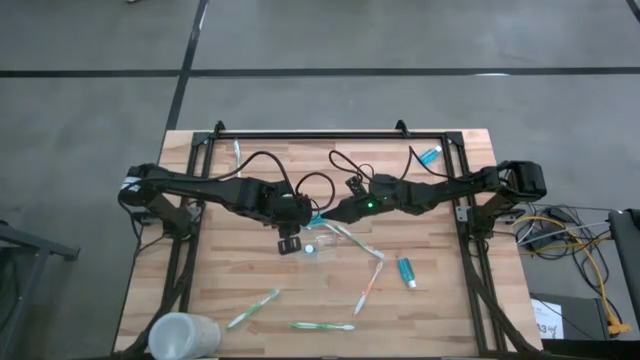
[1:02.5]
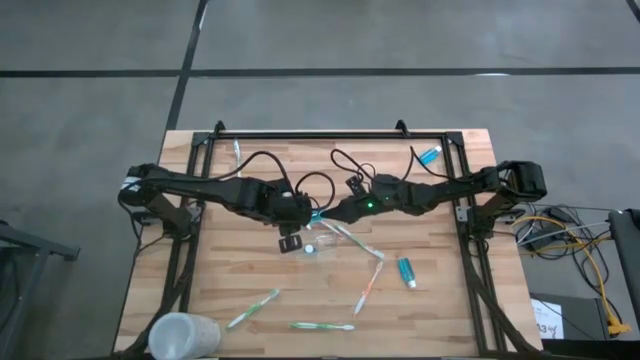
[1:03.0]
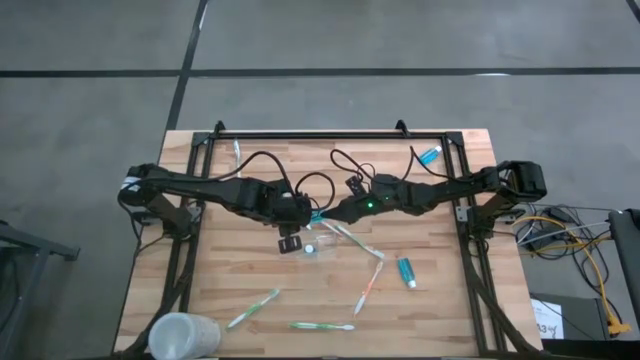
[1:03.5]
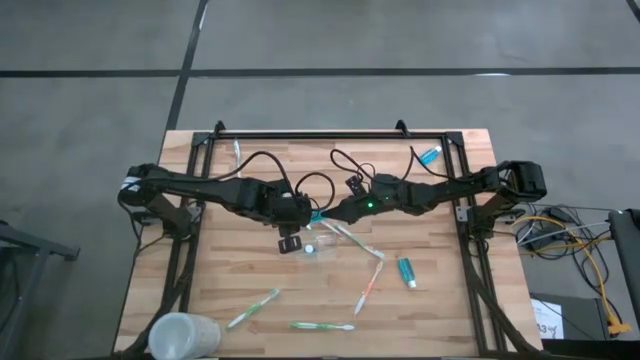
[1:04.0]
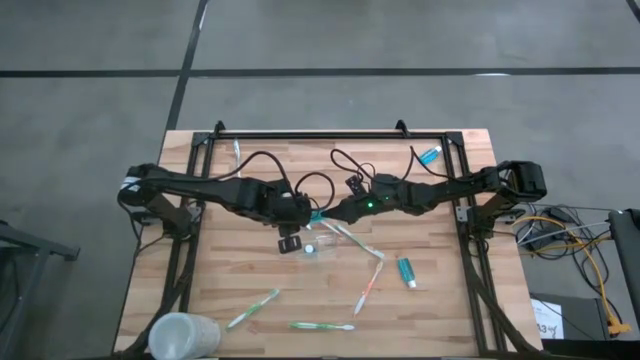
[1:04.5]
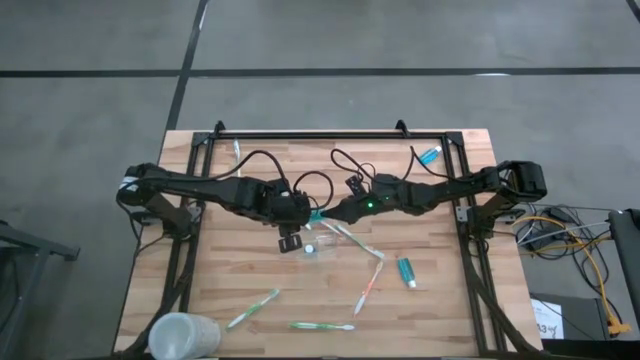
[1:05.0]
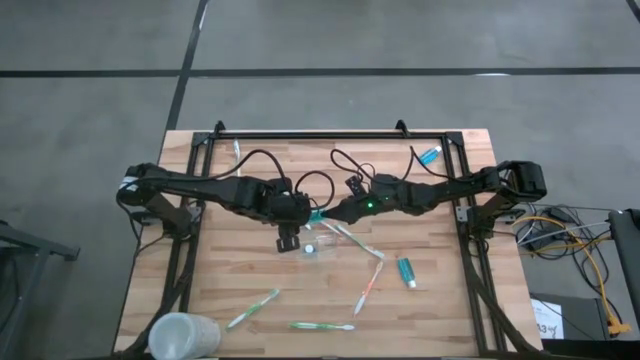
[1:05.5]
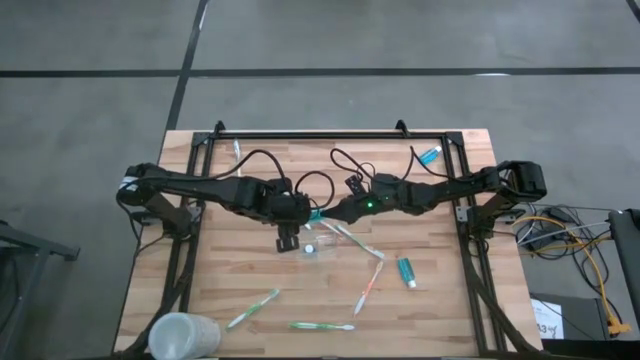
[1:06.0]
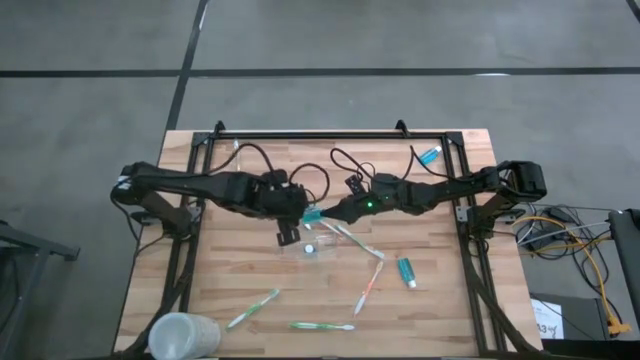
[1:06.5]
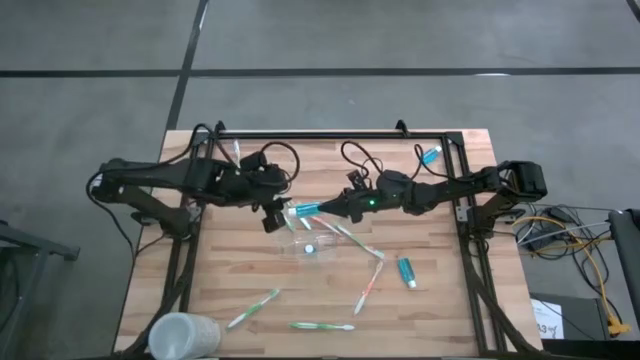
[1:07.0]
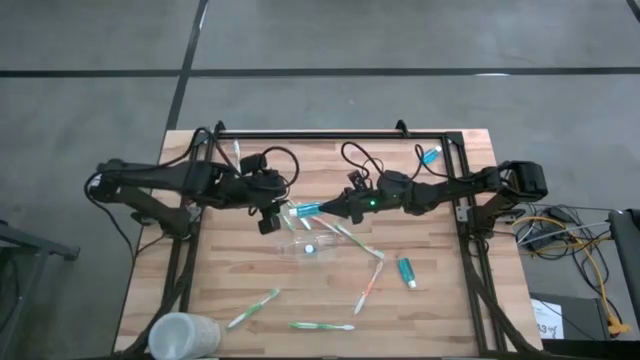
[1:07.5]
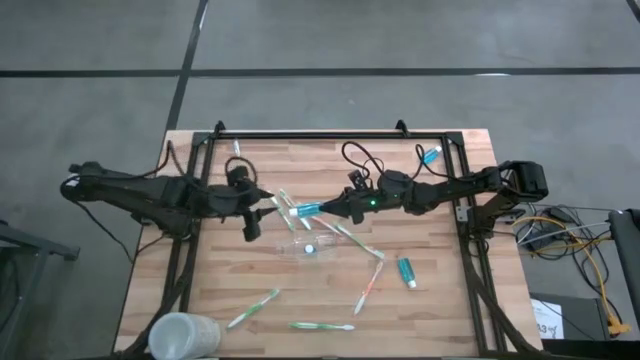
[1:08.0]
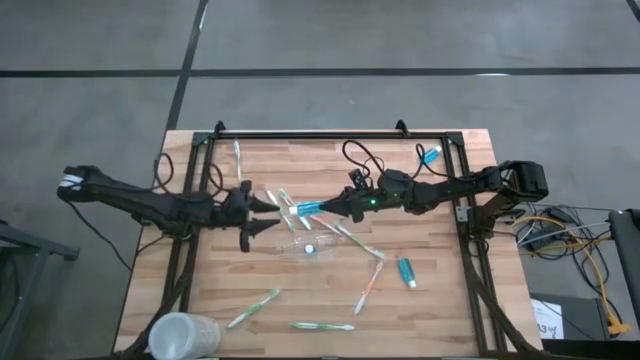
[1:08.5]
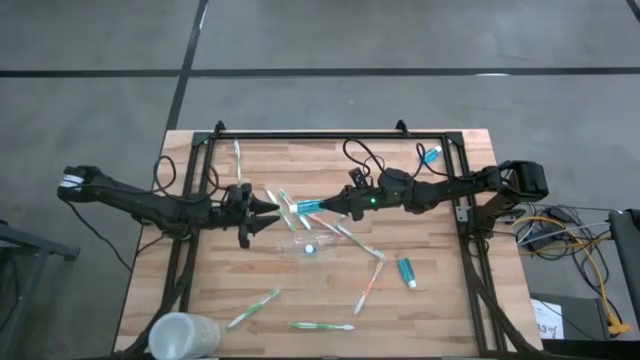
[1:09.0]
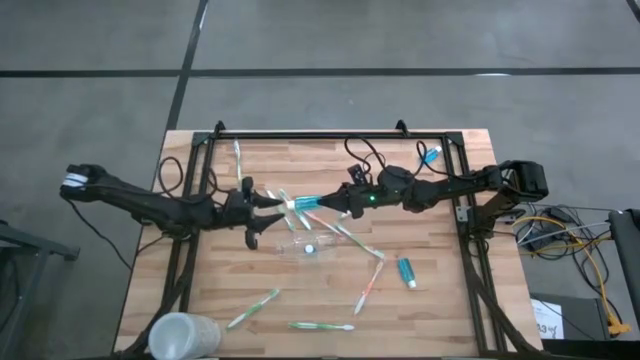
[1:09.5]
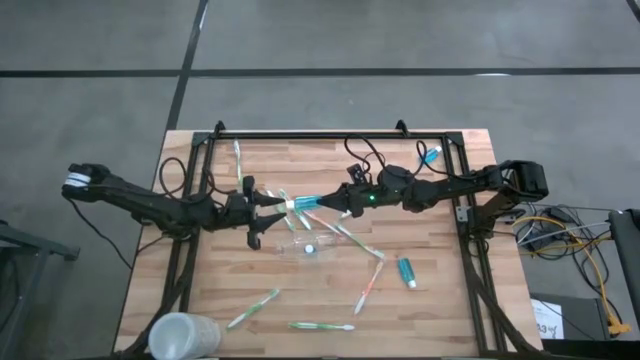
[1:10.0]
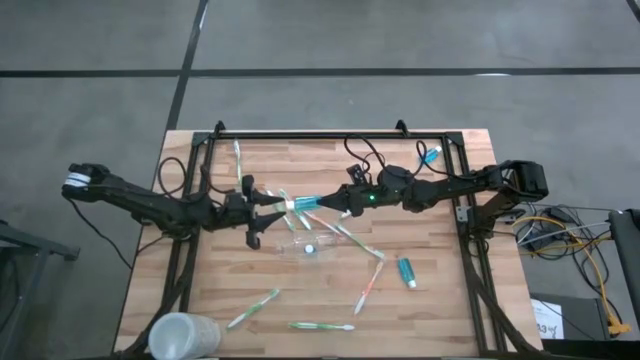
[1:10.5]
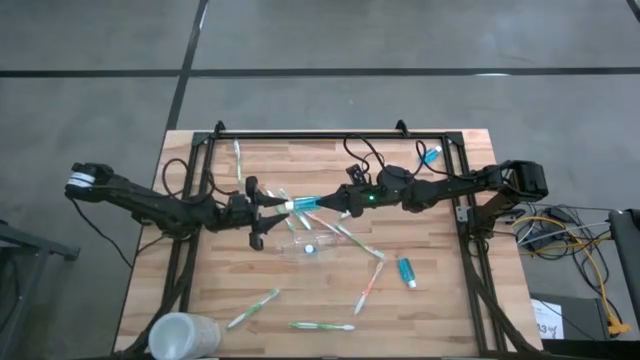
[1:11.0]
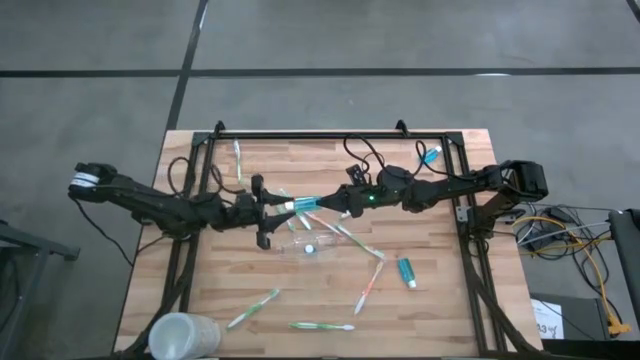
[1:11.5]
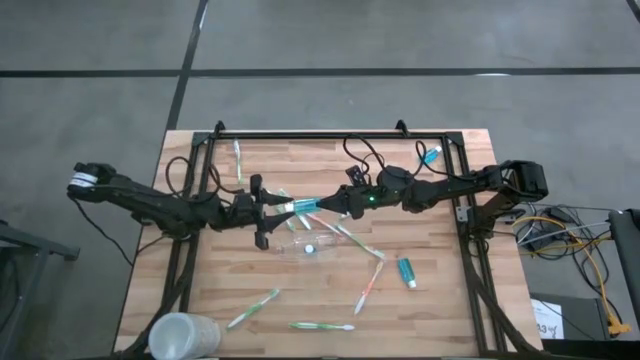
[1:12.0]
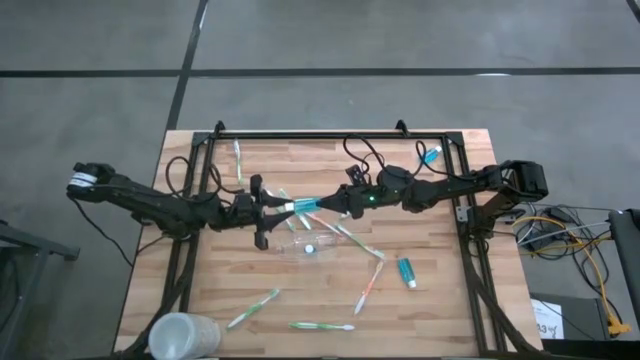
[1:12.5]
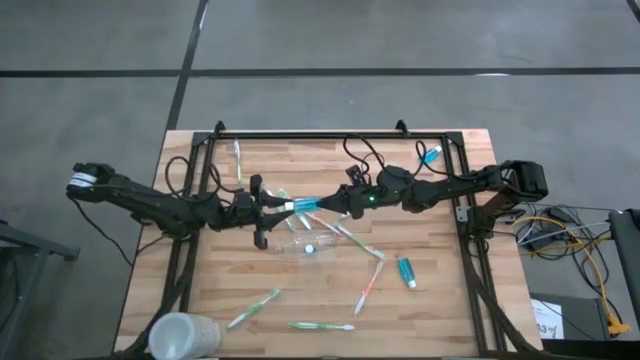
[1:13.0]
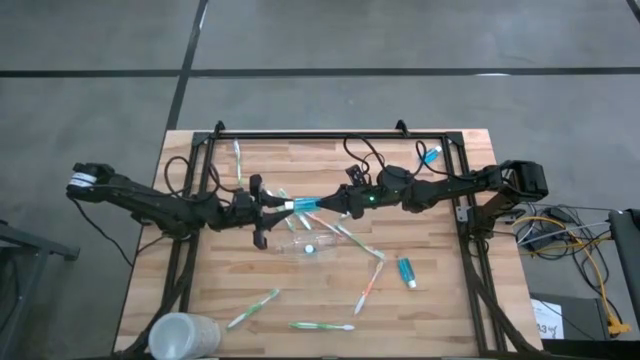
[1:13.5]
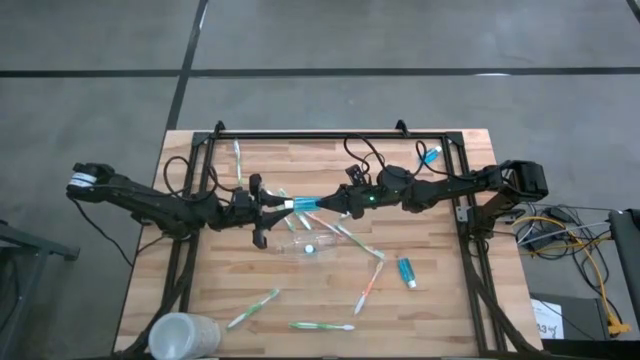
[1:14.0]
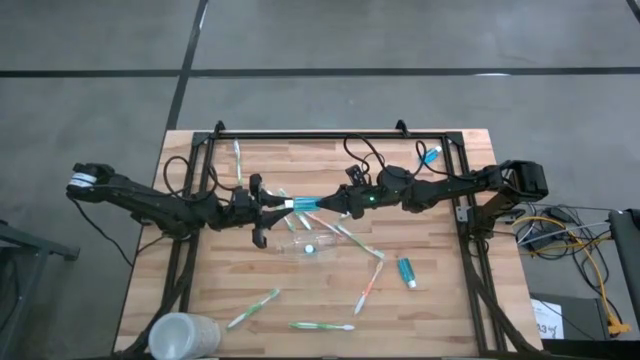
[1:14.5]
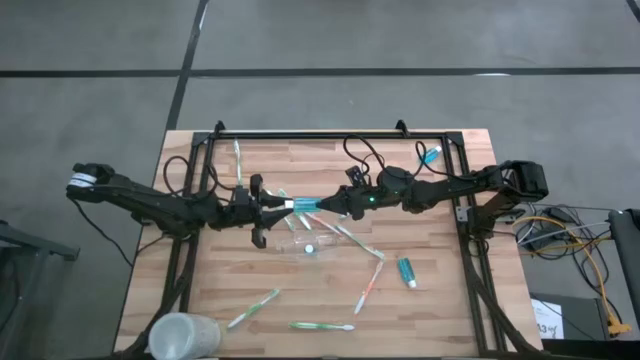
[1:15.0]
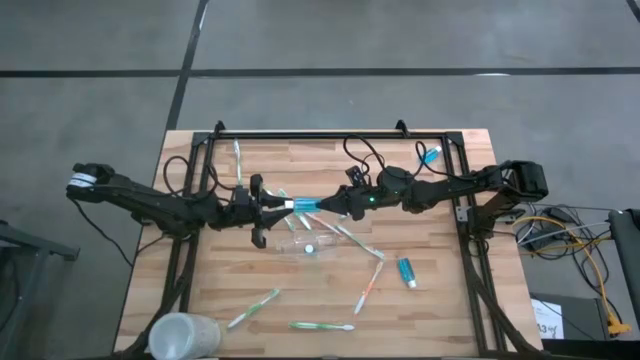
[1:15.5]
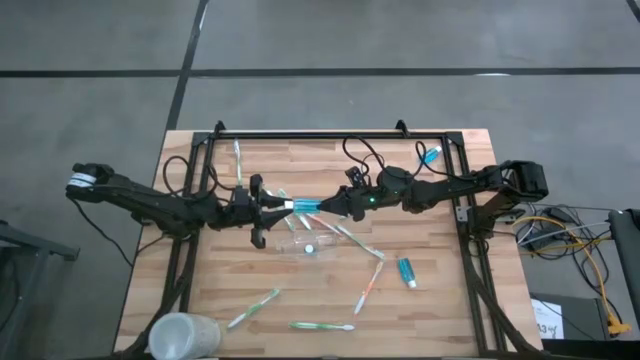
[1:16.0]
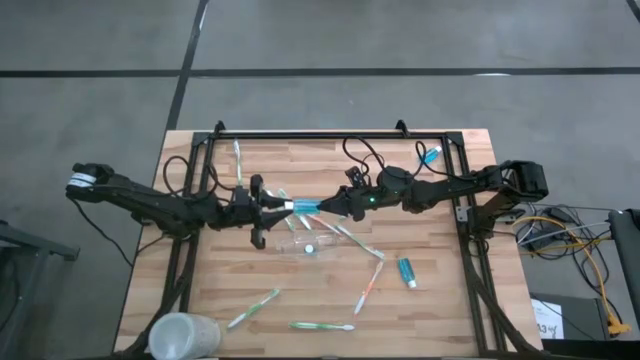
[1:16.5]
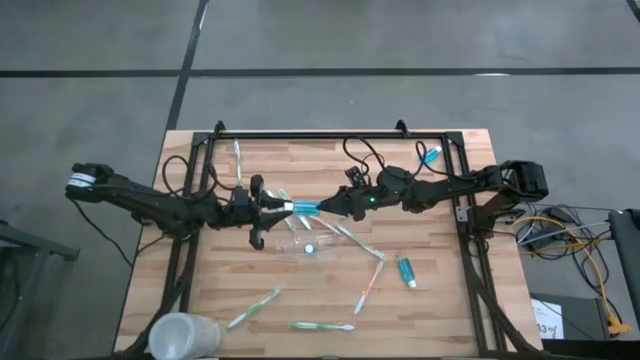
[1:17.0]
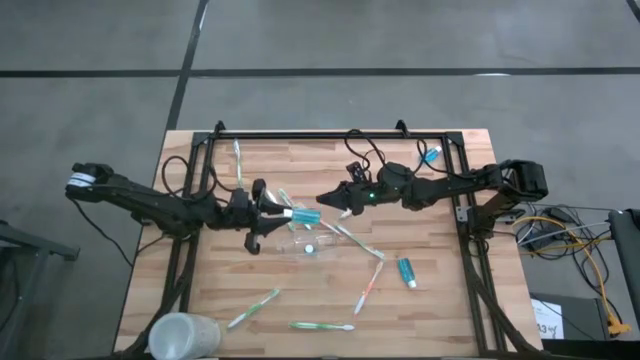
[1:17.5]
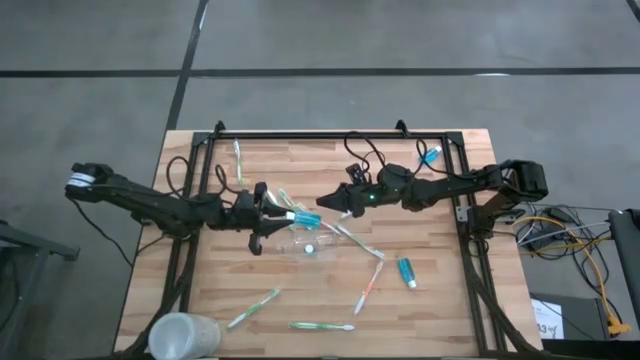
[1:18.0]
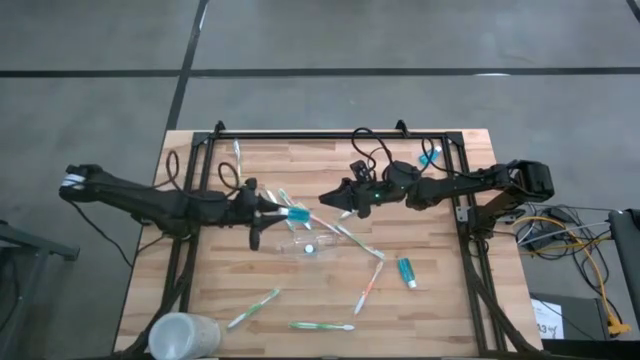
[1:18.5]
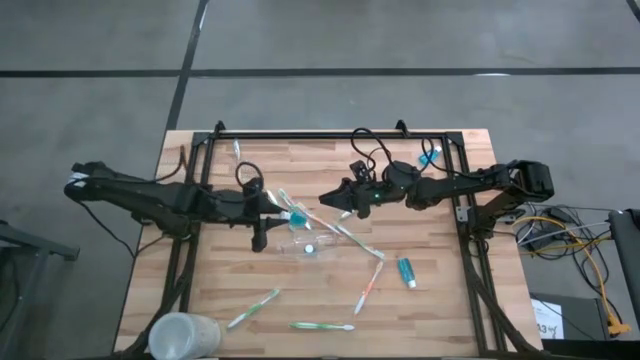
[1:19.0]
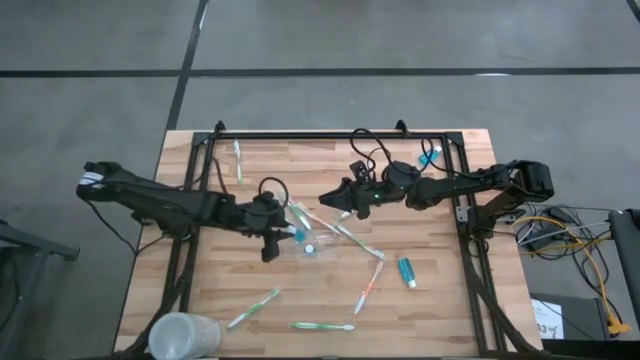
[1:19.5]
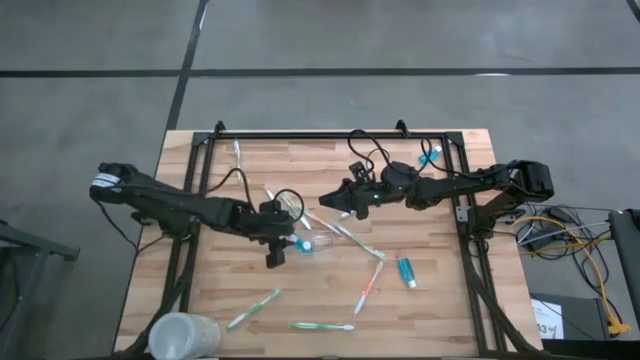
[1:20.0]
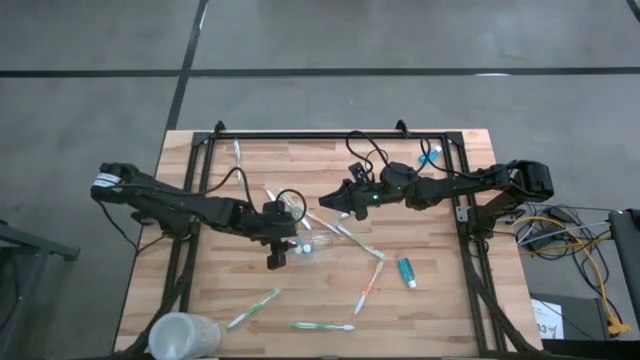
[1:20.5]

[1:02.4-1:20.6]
Task: Pick & Place toothbrushing station
Put the blue mouthwash bottle into the transparent organizer
